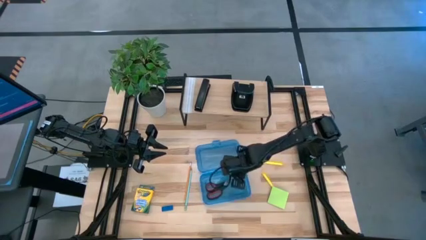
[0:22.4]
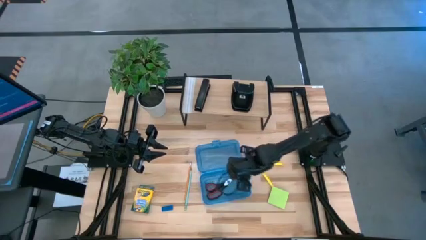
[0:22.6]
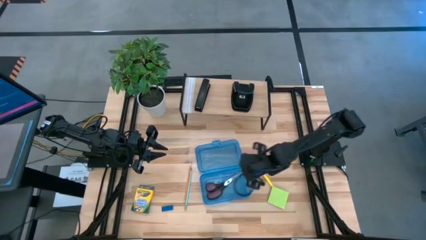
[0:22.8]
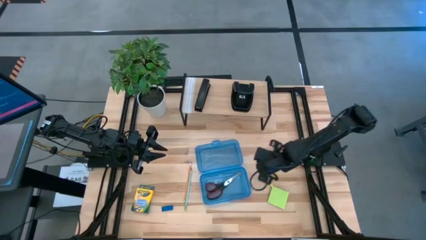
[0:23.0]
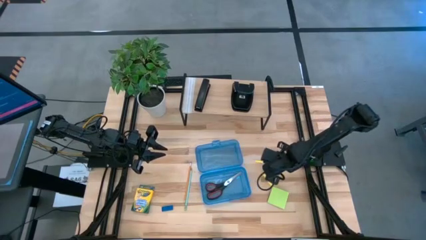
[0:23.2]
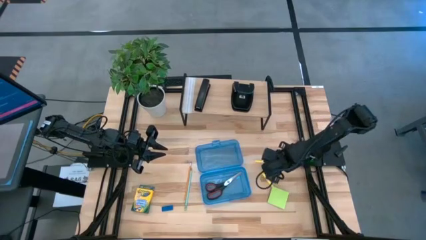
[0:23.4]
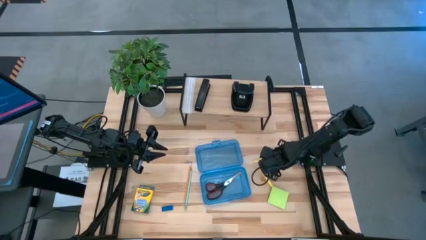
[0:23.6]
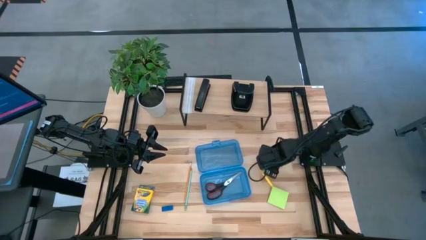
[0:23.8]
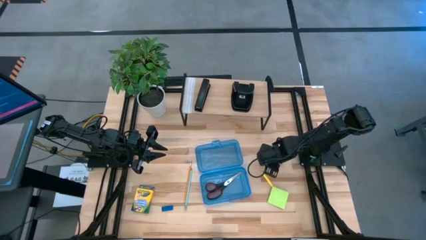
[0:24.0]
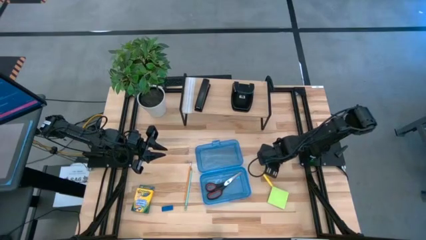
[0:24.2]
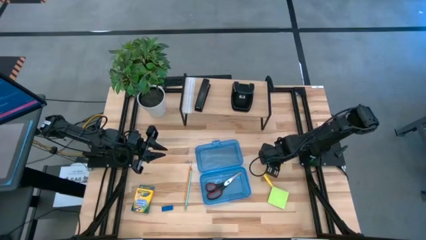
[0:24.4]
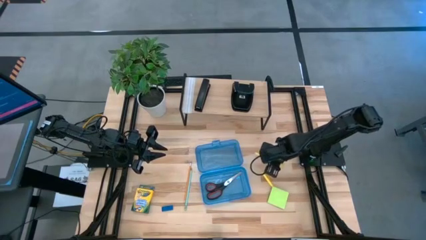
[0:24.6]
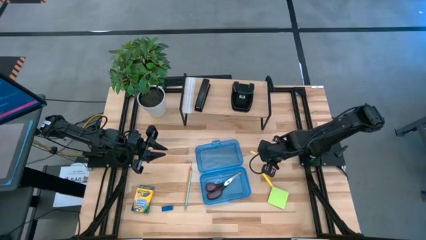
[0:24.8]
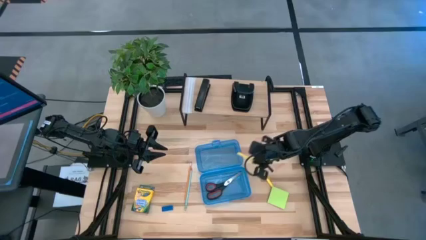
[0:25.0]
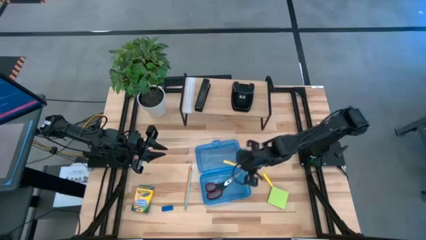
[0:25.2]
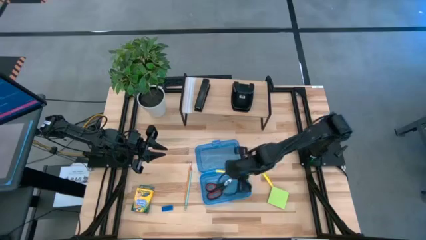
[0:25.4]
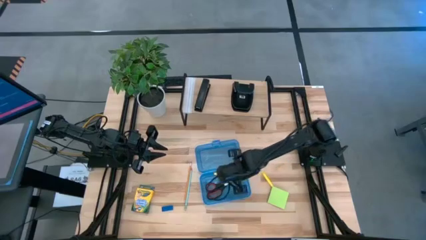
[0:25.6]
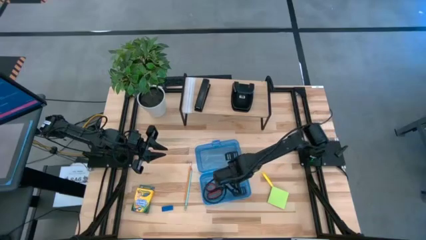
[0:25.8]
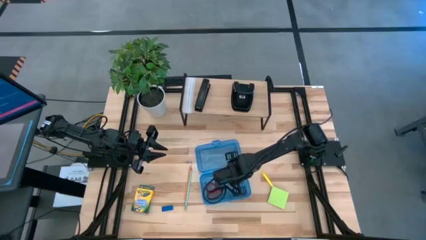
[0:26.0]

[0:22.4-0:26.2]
Task: Pack school essentials
Put the top yellow pen into the blue supply box

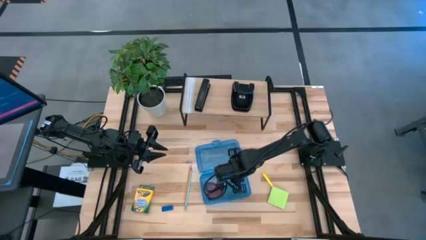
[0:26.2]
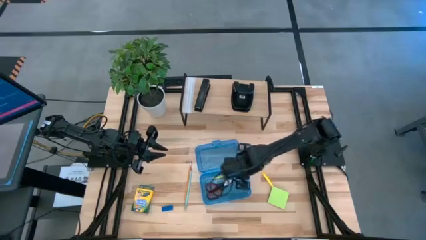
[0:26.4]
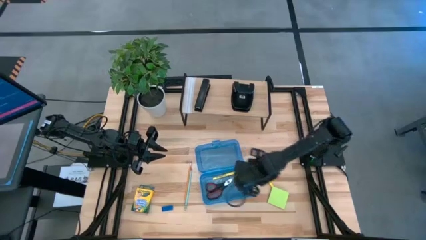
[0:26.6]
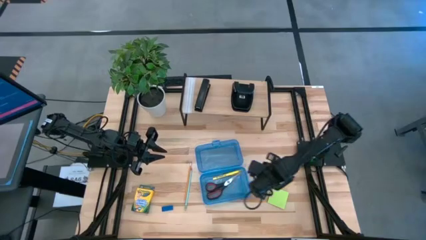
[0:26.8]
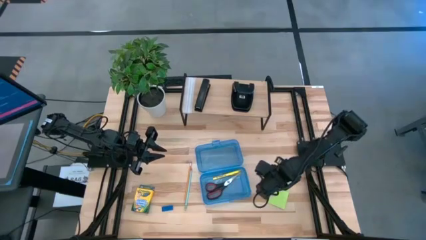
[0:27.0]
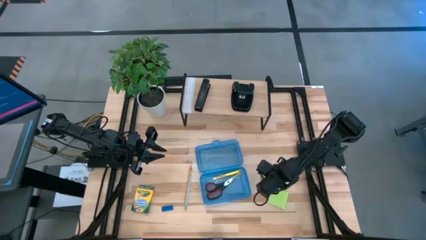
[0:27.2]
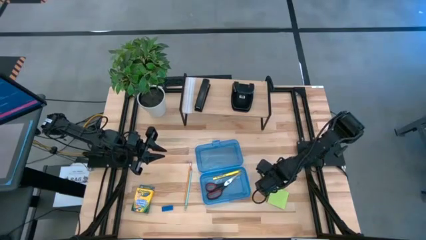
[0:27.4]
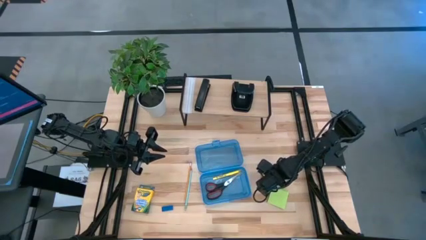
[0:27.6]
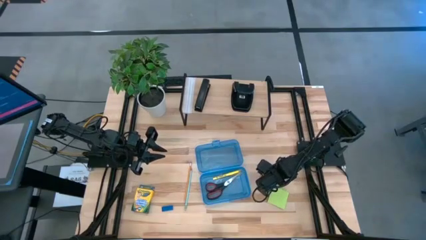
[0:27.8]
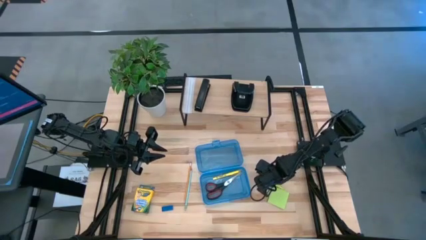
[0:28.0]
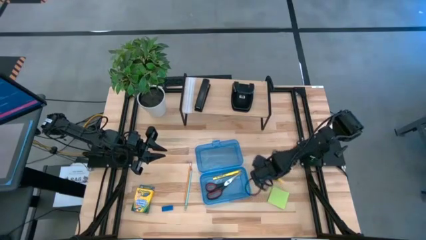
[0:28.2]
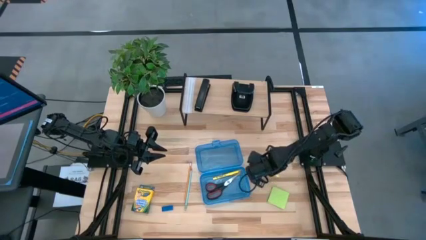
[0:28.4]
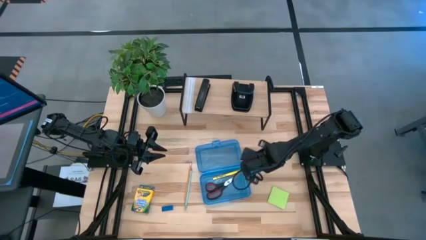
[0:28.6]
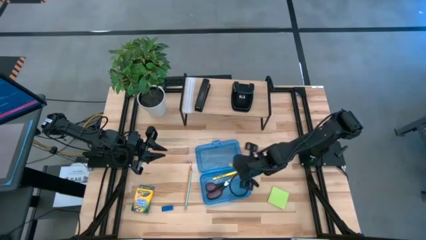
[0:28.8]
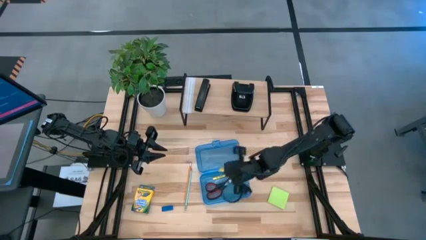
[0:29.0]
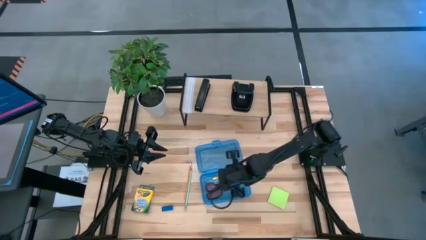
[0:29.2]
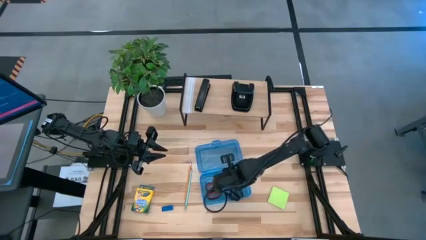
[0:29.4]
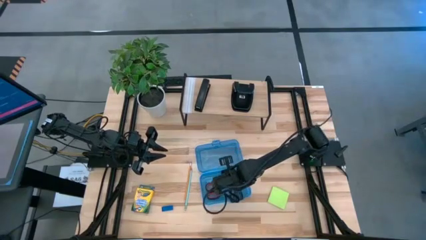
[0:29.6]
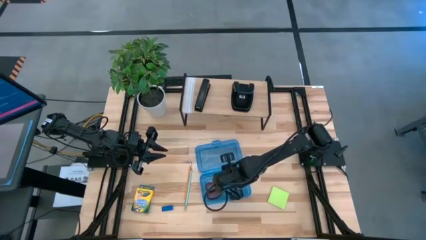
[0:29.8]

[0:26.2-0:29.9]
Put the yellow pen into the blue supply box

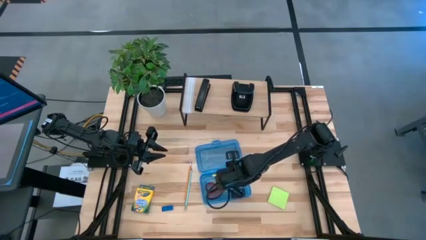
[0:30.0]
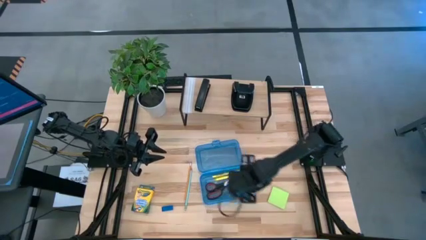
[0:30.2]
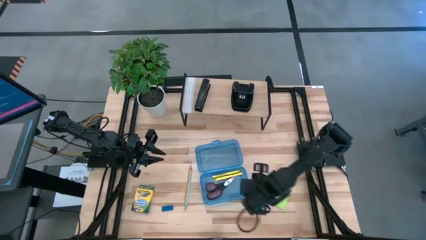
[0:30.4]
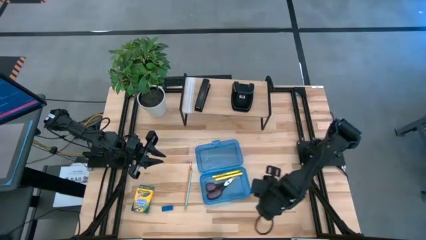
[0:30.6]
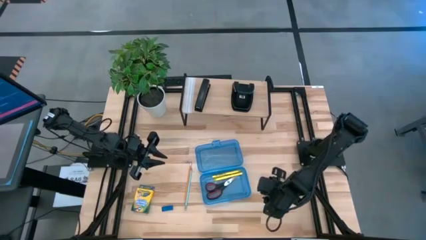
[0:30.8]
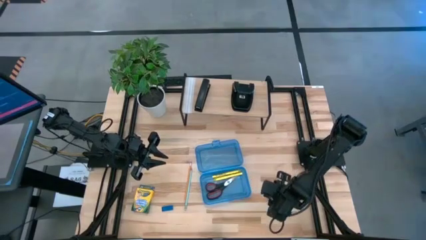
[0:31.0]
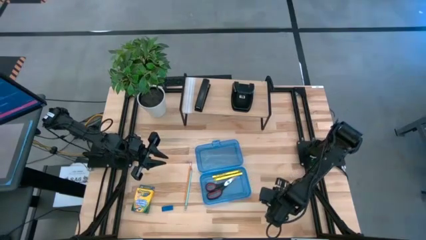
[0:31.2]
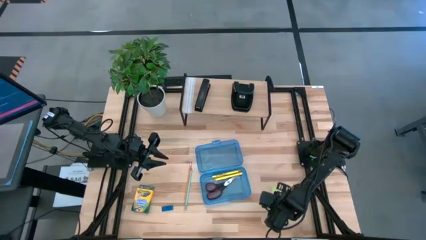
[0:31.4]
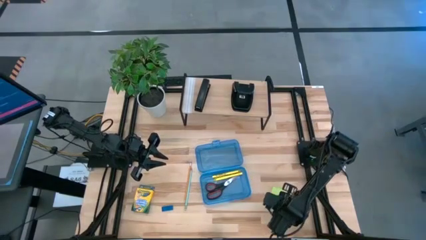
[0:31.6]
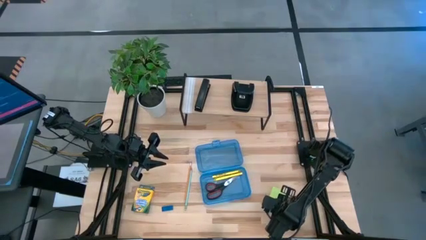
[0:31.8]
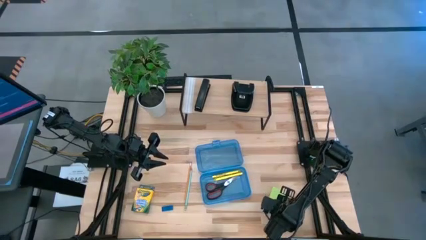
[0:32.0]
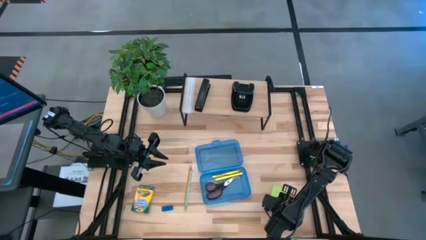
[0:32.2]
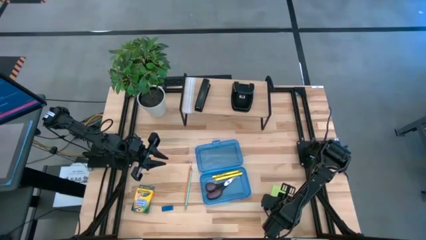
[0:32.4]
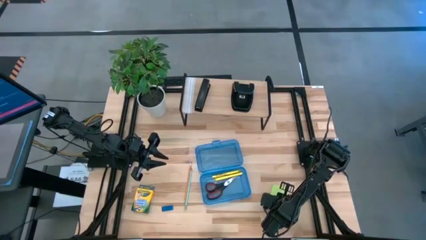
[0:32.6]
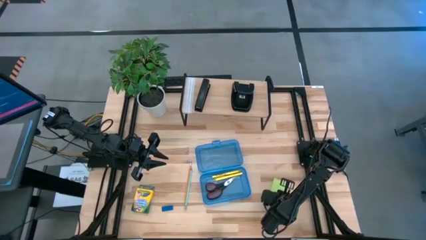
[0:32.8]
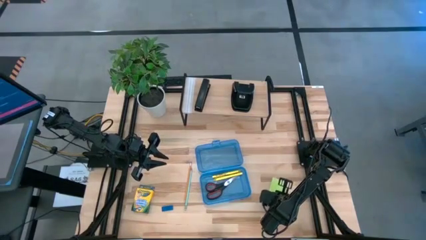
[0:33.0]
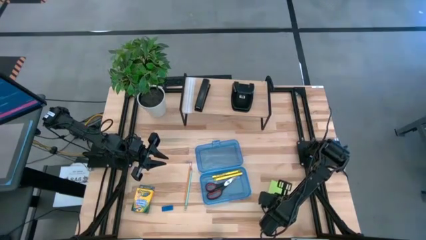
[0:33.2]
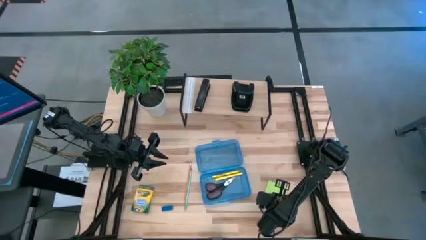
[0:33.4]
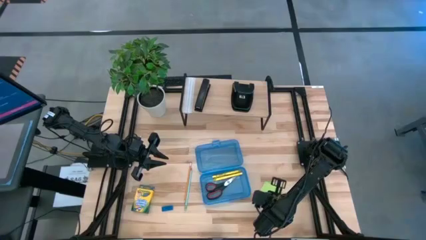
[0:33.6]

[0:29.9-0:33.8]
Put the green sticky notes into the blue supply box

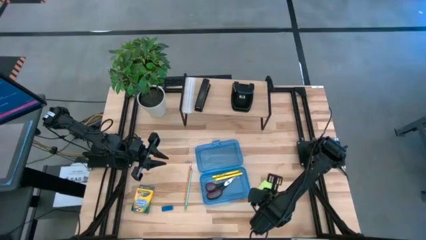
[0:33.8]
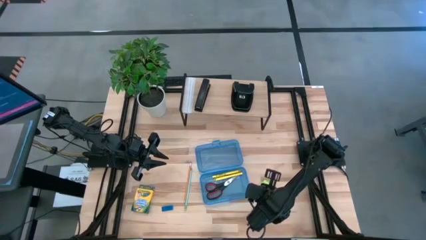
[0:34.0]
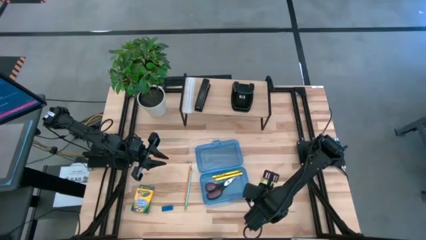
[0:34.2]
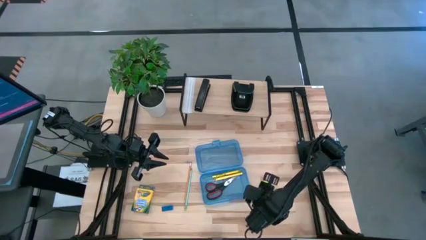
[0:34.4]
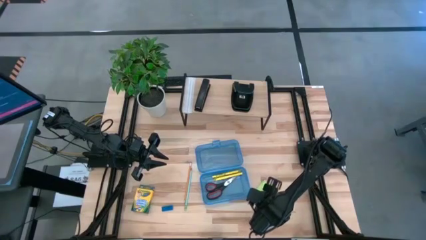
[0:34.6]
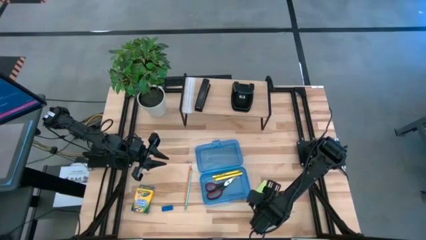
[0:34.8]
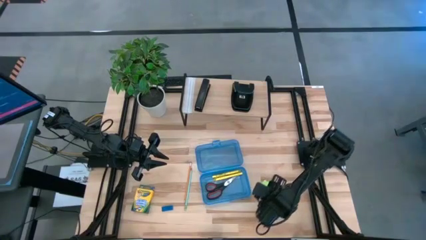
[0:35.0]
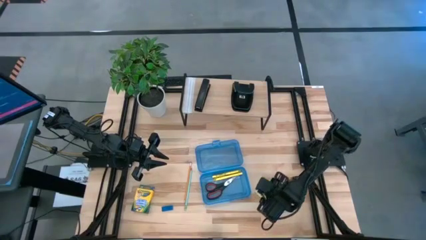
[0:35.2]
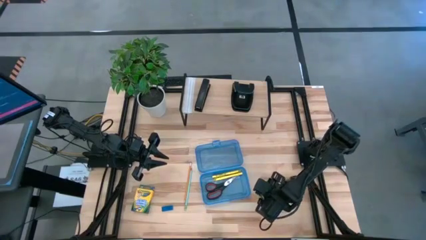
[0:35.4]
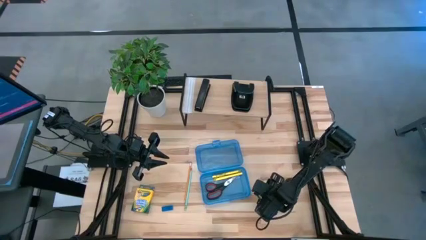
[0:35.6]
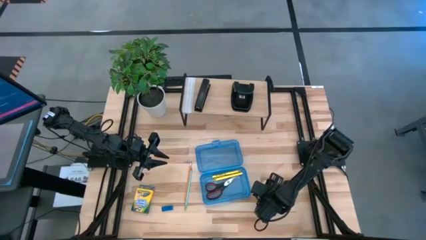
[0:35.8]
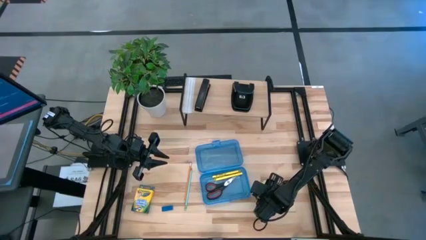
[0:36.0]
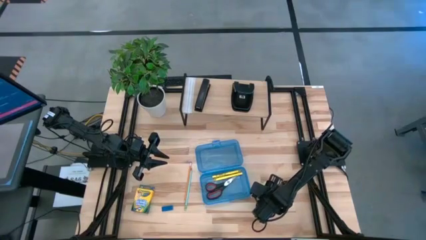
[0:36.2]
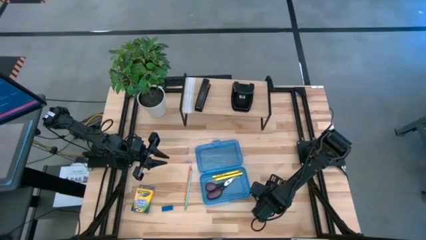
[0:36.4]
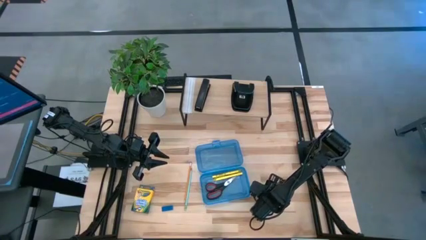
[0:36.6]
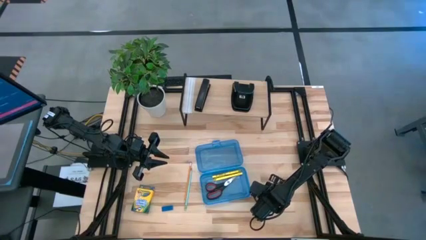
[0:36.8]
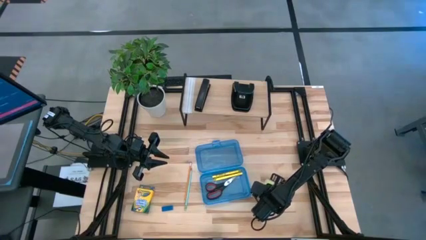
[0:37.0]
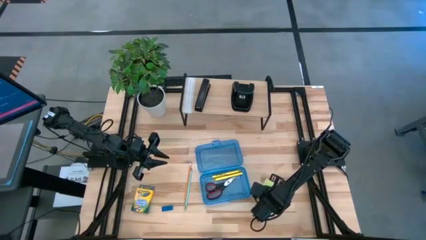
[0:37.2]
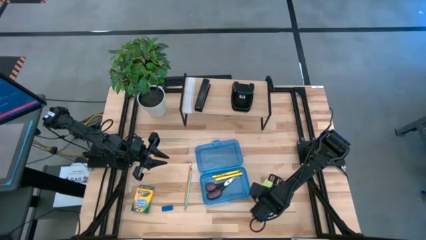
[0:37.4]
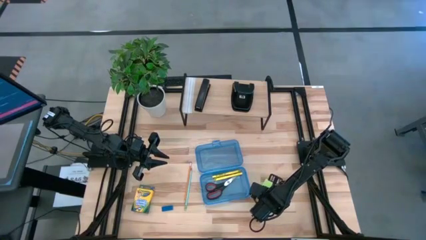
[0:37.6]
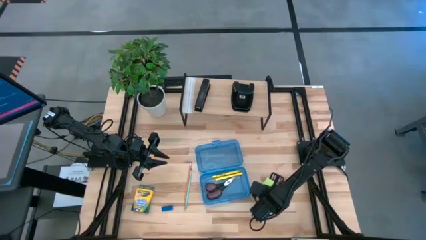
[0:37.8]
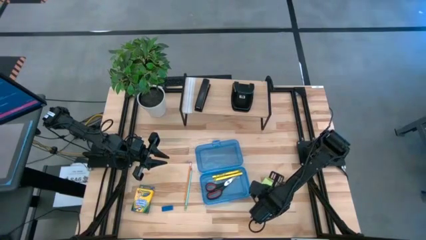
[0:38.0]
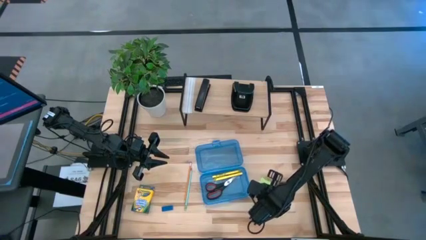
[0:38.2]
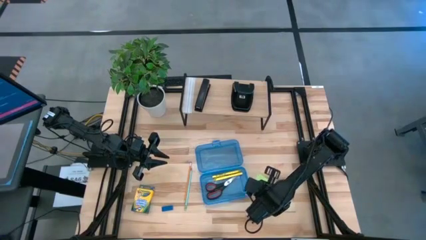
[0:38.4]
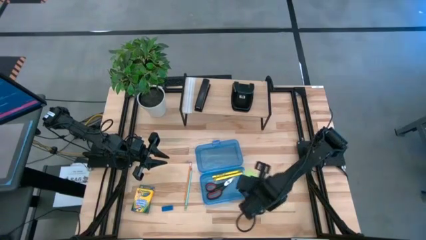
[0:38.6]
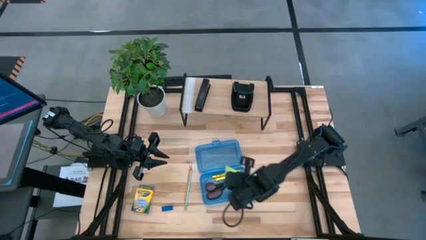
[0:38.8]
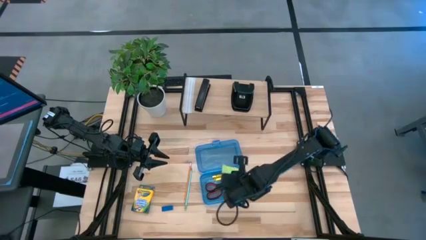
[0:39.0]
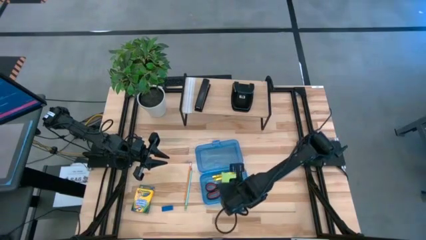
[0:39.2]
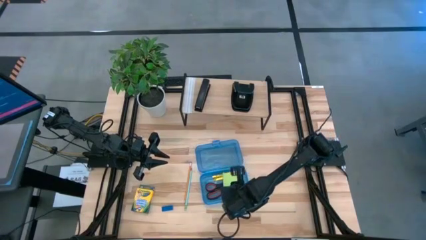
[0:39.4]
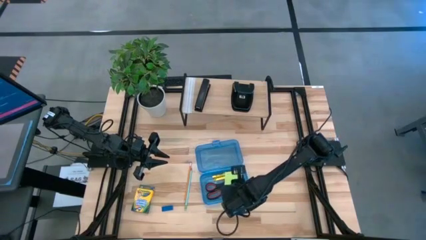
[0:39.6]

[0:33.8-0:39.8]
Put the green sticky notes into the blue supply box
